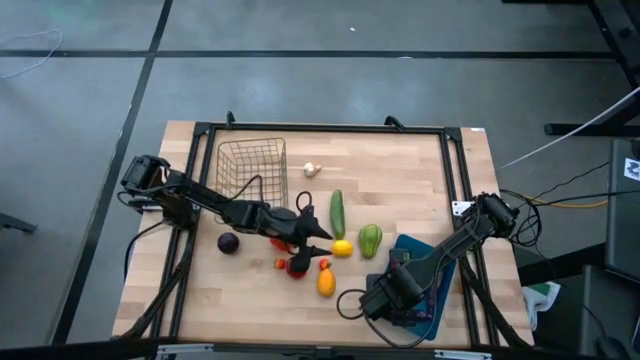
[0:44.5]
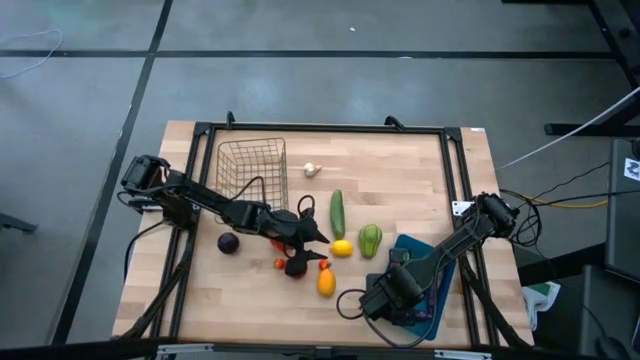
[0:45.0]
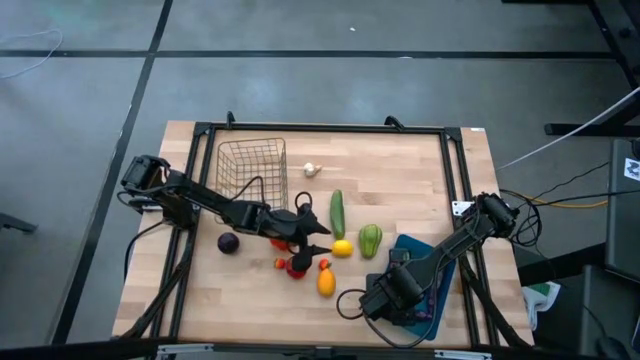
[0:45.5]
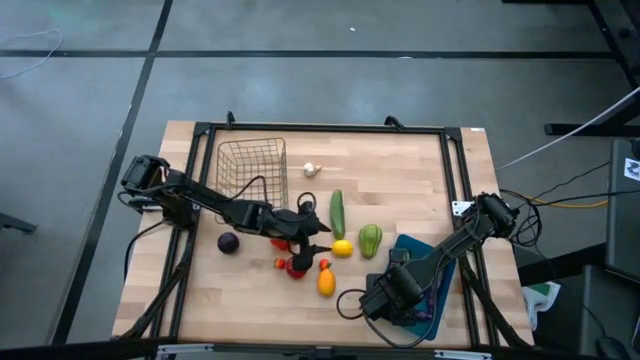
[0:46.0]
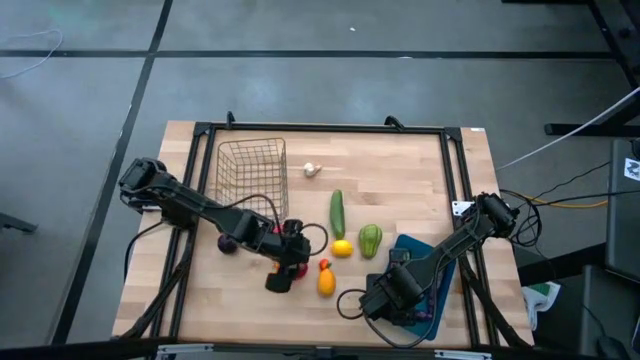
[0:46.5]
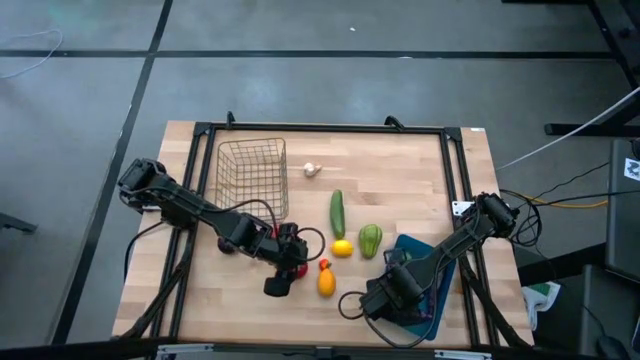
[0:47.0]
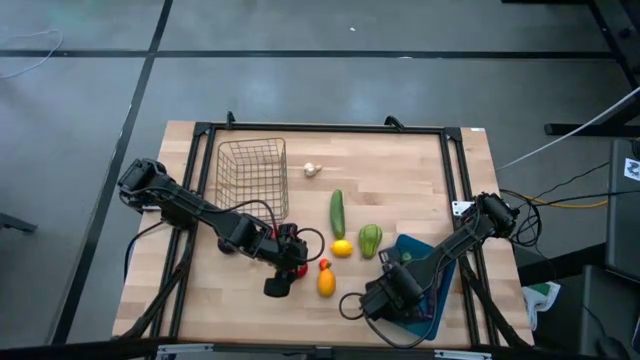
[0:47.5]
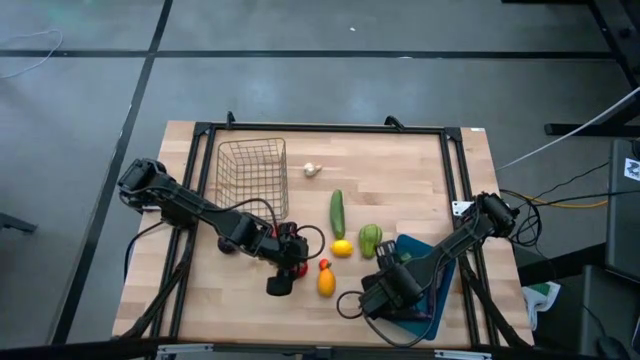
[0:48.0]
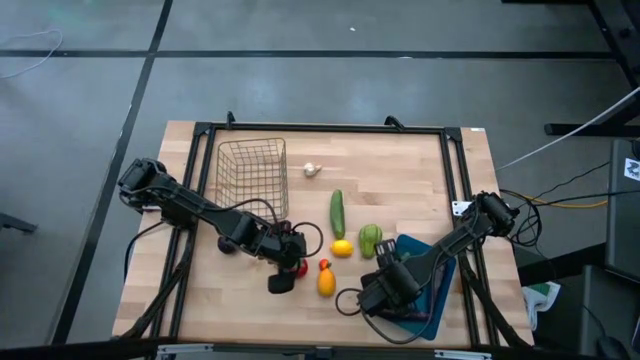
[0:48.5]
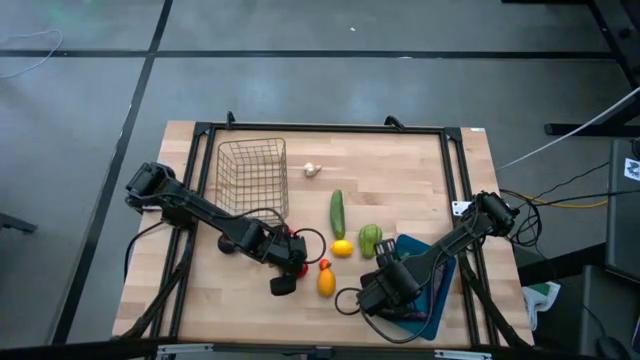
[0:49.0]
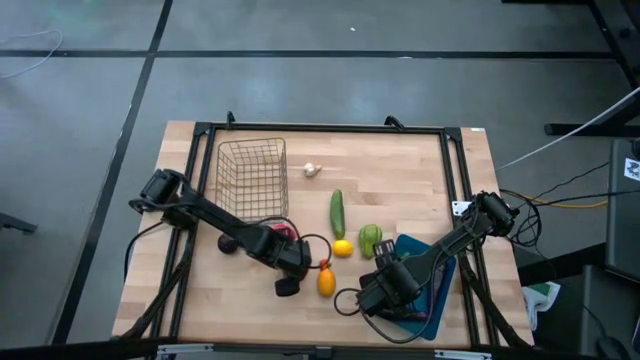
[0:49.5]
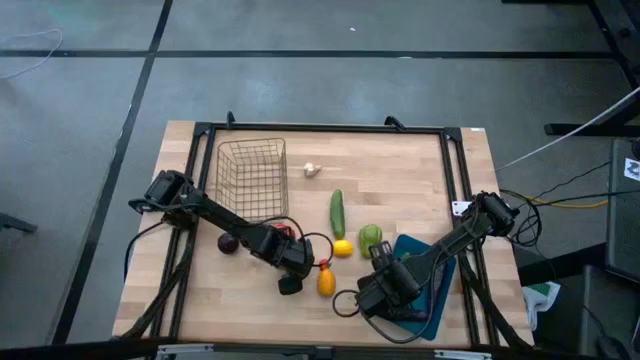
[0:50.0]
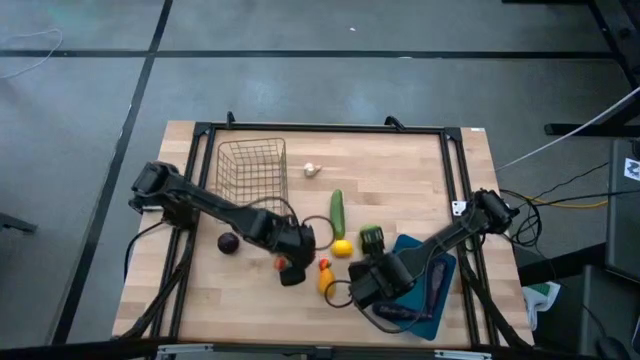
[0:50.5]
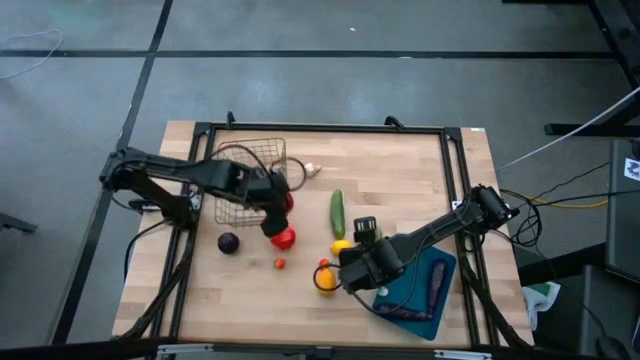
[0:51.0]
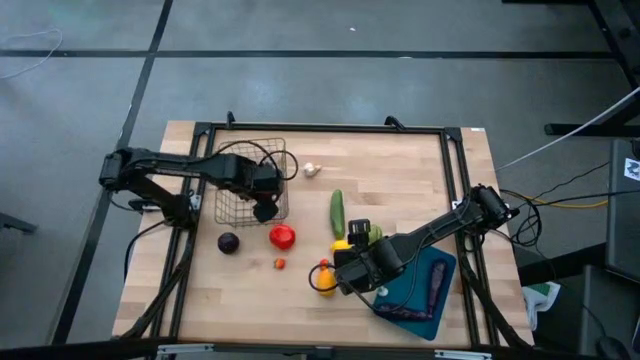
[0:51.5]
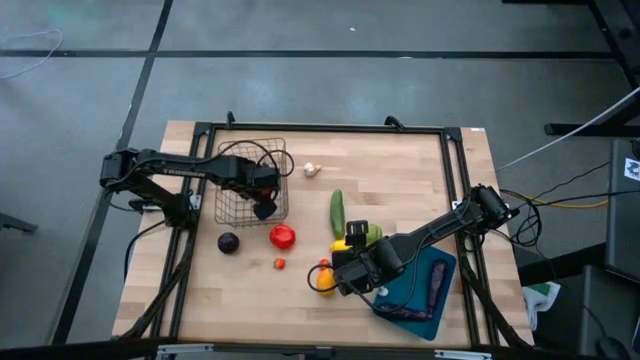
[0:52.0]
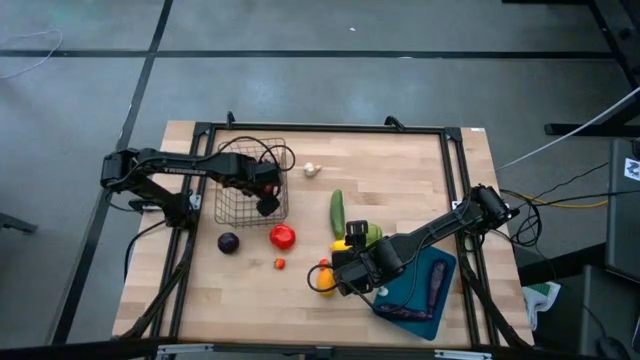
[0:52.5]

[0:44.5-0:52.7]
Task: Sort produce into baskets
Put the red tomato into the wire basket

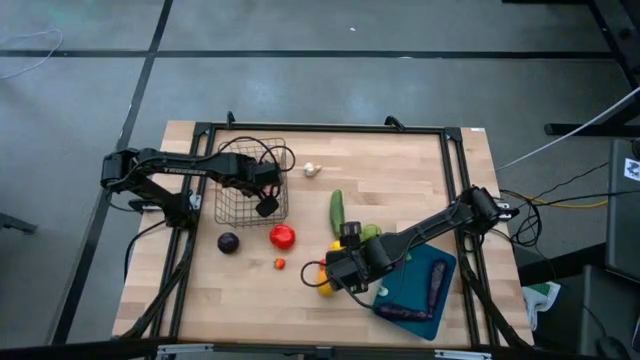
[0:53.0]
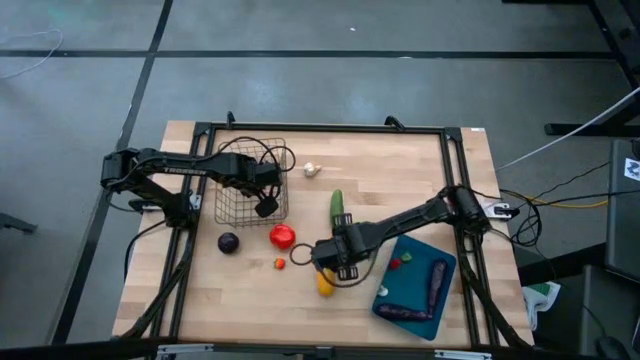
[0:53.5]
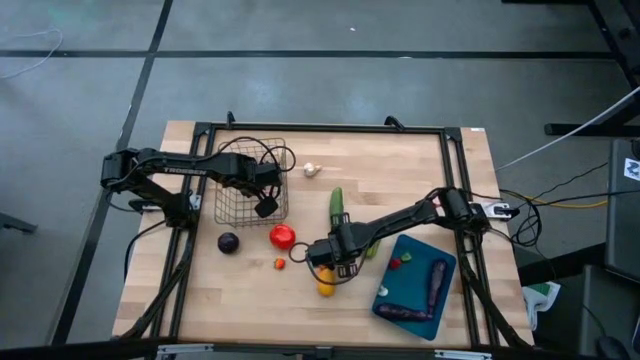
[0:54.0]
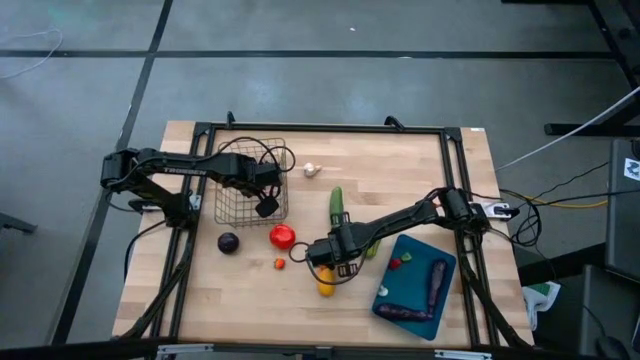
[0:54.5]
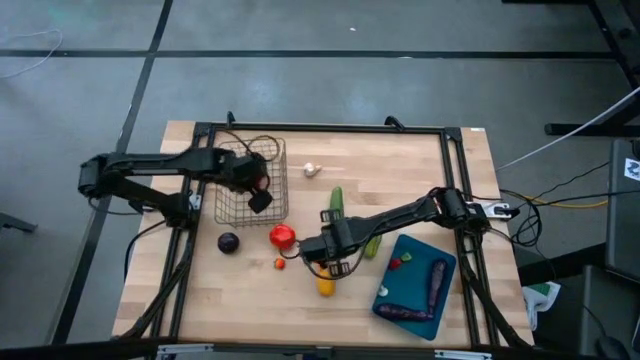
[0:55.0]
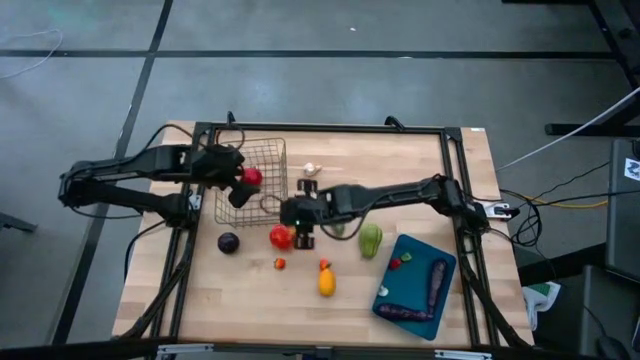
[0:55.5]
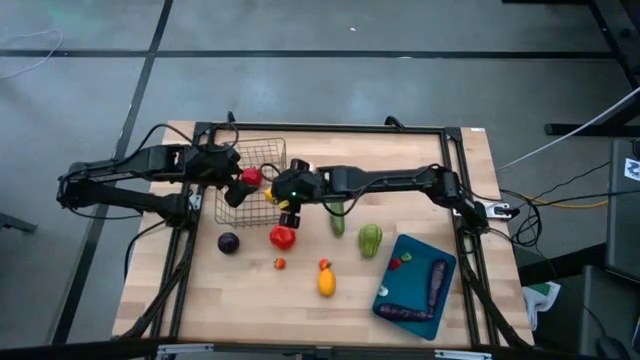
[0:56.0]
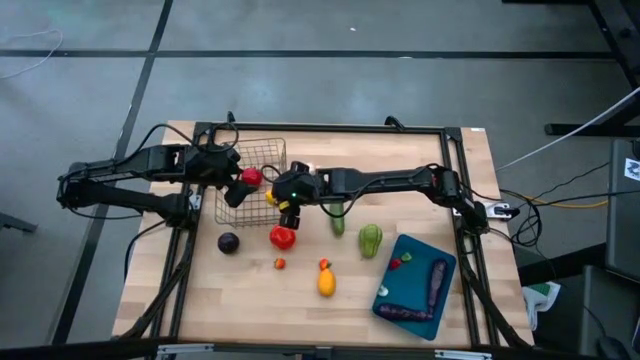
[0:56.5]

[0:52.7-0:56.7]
Put the yellow lemon into the wire basket

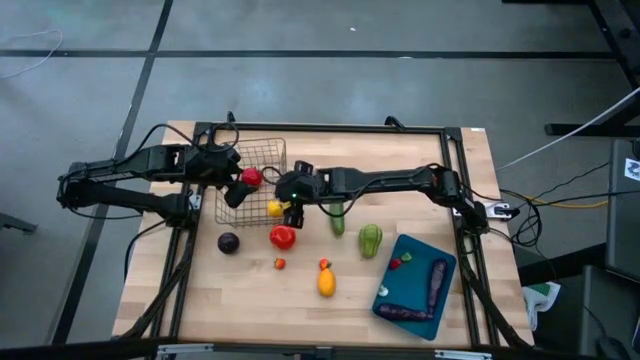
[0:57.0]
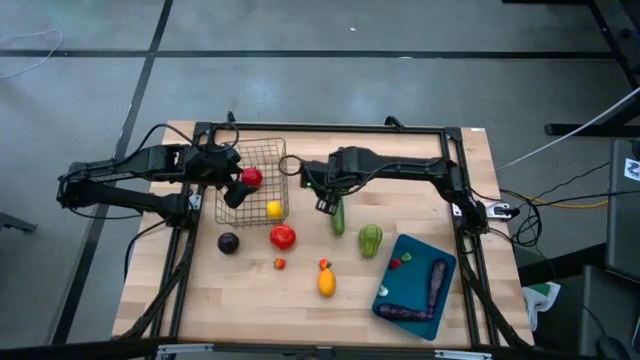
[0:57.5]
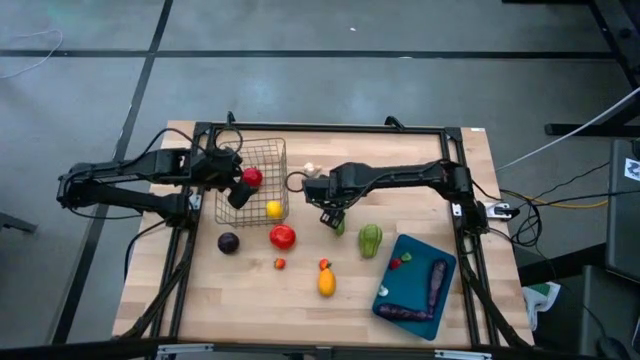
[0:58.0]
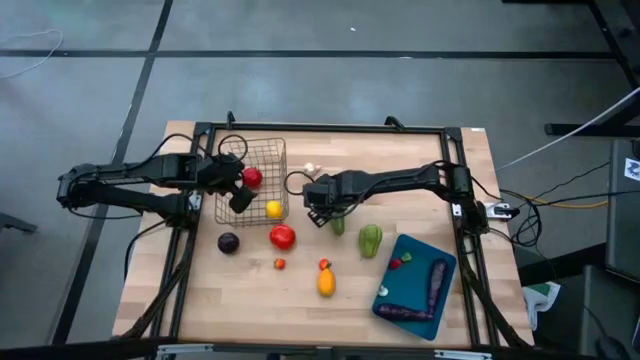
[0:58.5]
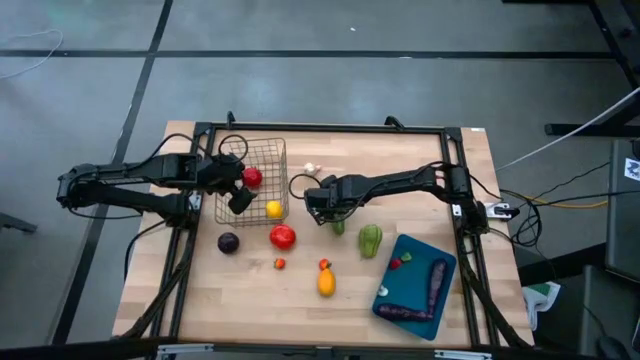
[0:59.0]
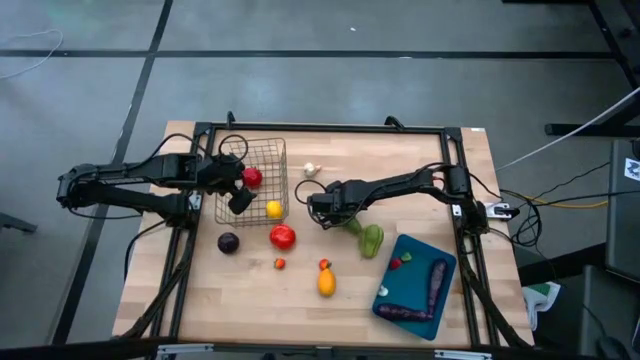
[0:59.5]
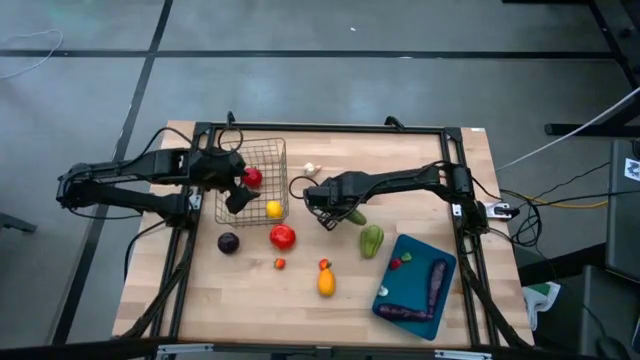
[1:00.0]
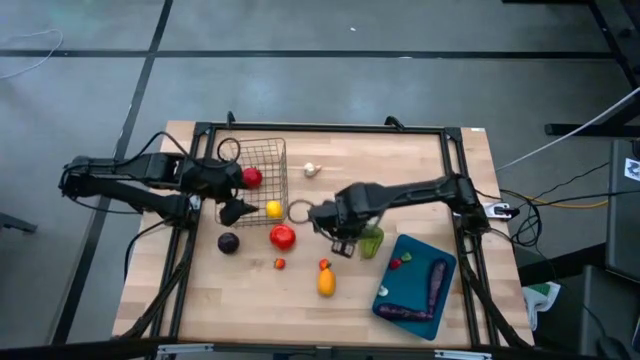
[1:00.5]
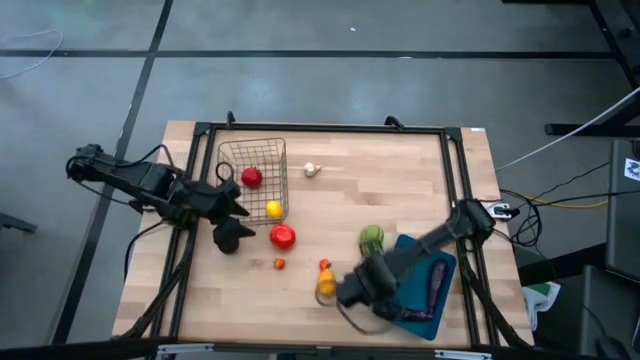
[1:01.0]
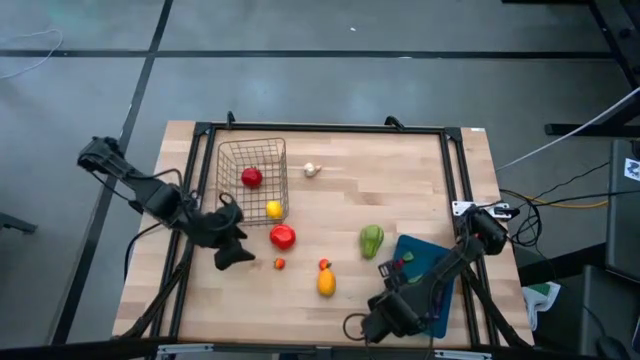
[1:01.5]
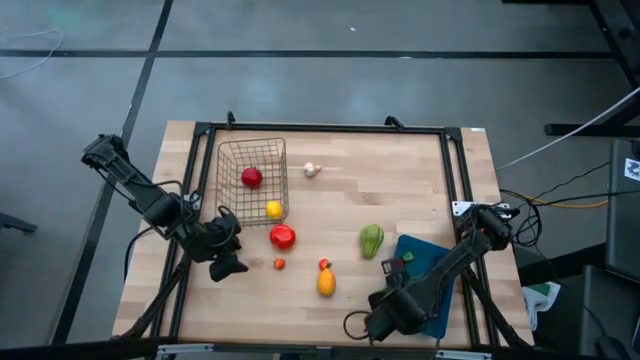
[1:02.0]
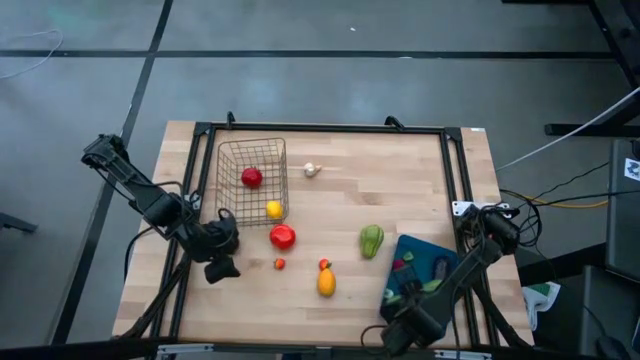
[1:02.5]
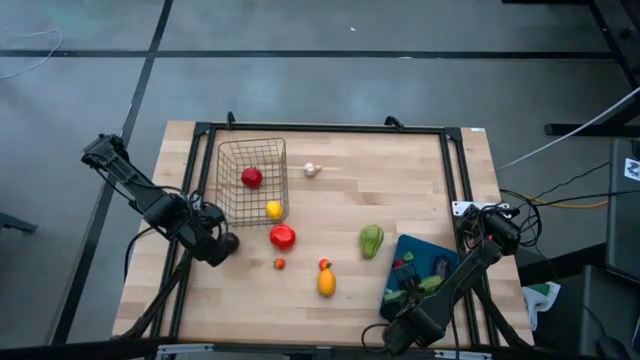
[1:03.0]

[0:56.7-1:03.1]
Put the green cucumber into the blue bin

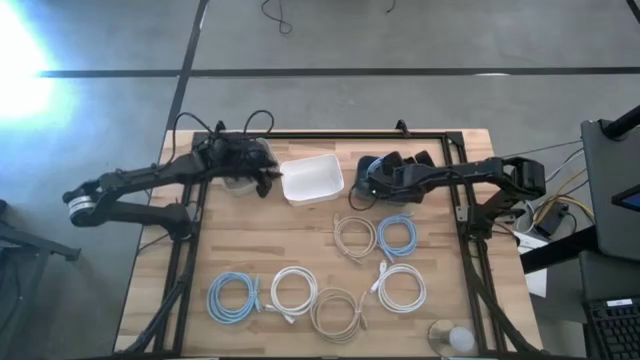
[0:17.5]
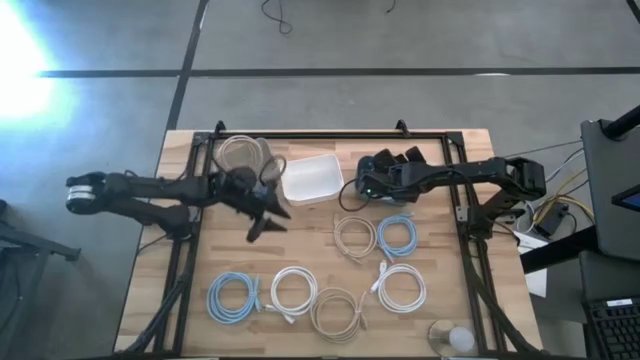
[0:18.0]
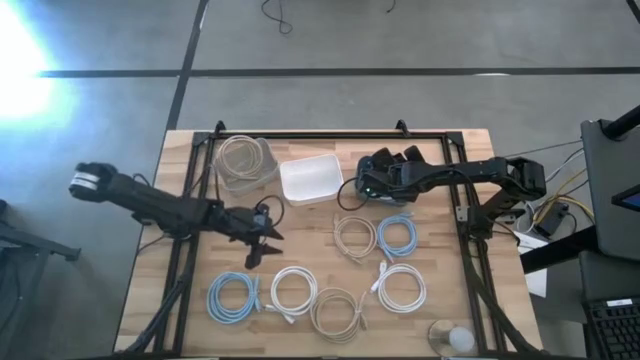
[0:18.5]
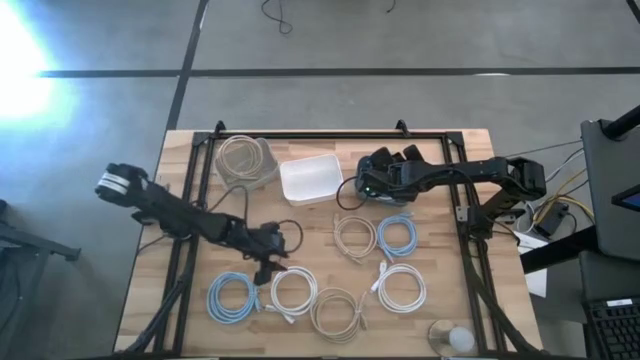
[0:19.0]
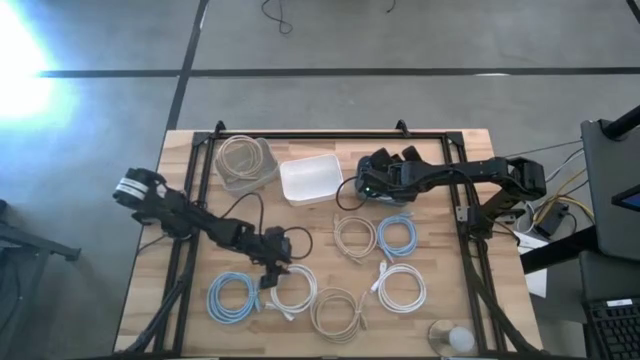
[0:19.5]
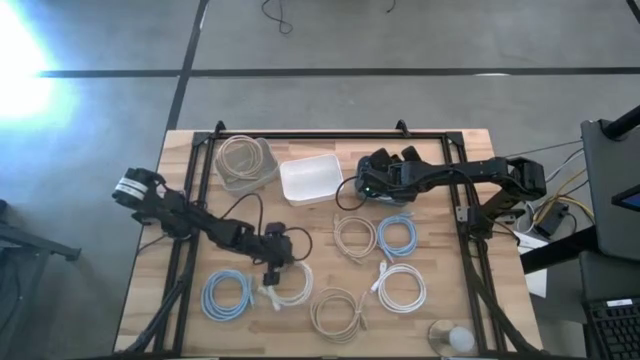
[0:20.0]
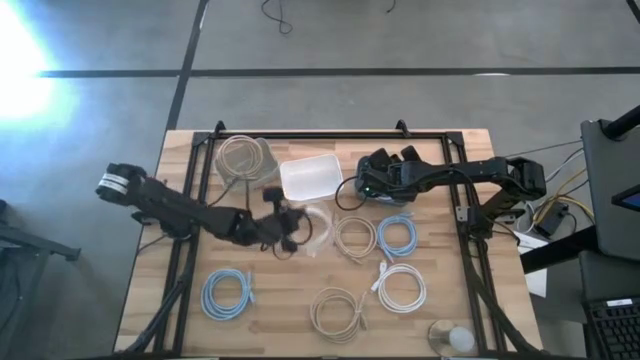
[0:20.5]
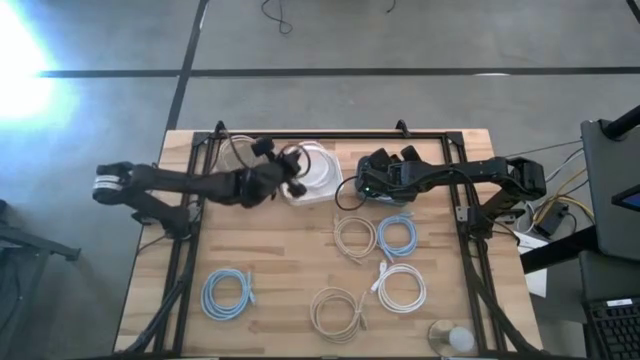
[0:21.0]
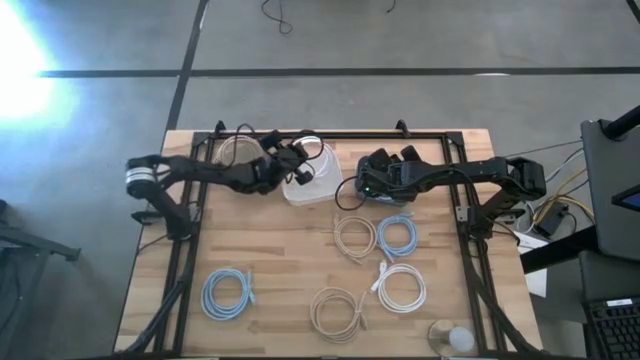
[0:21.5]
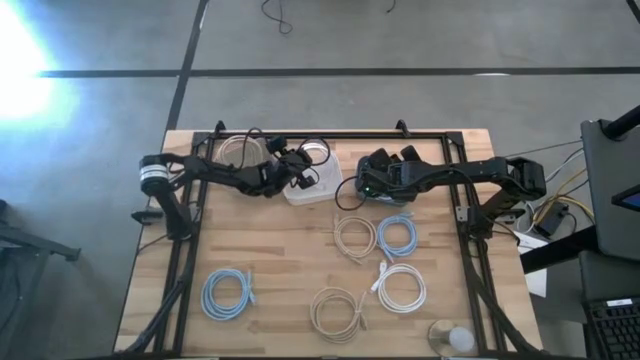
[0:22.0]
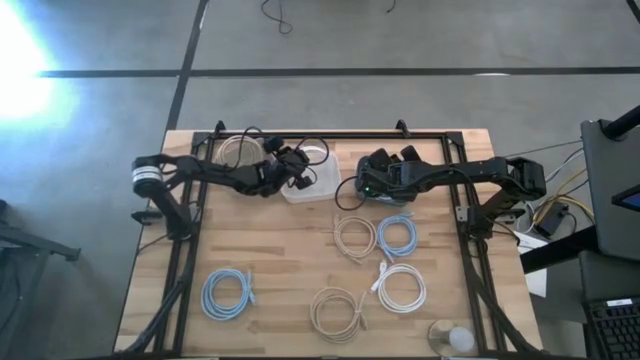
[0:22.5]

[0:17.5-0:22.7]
Task: Sort HDMI cables
Put the left white HDMI cable into the white bin
